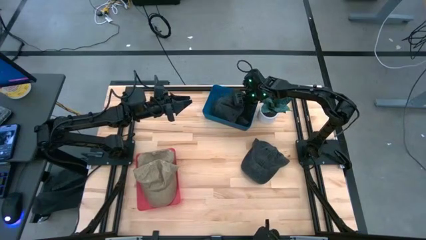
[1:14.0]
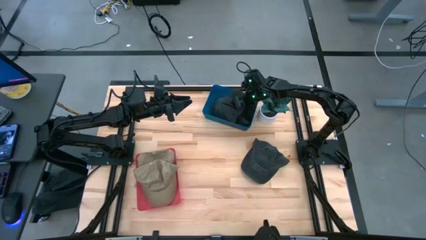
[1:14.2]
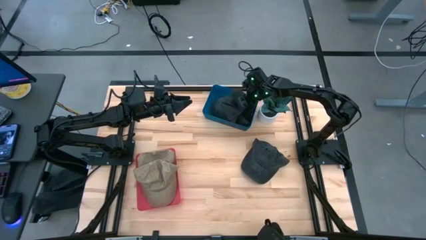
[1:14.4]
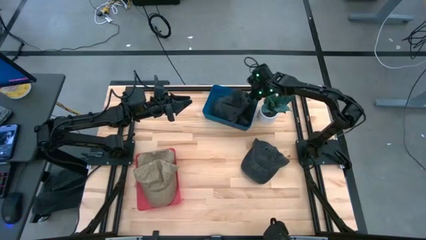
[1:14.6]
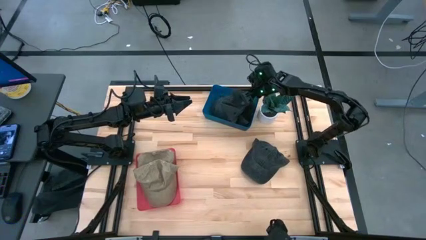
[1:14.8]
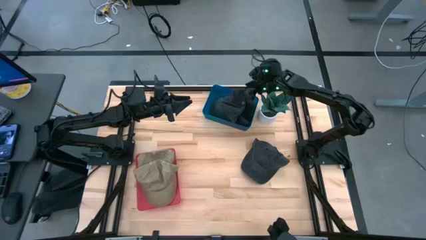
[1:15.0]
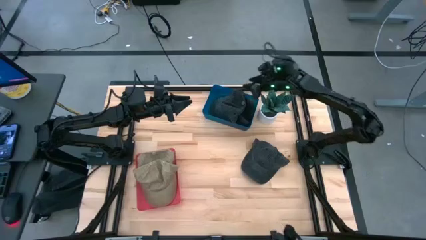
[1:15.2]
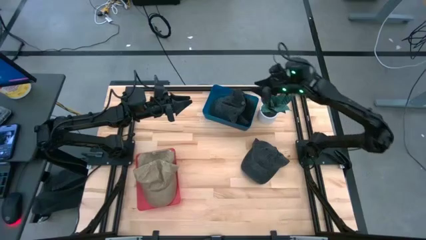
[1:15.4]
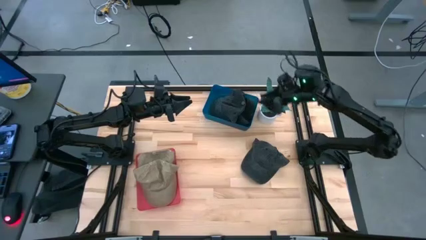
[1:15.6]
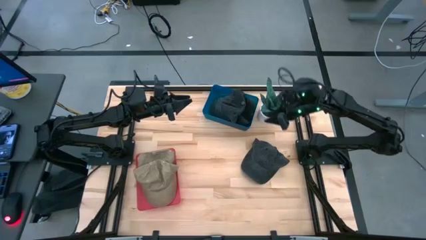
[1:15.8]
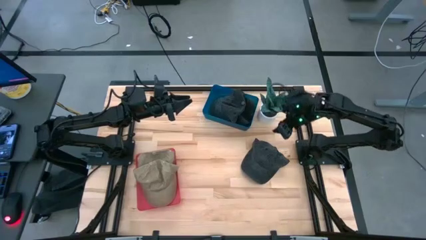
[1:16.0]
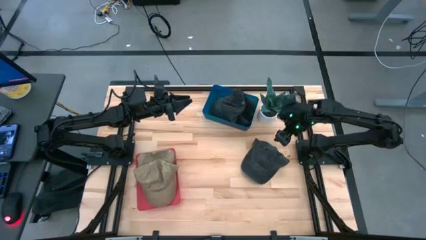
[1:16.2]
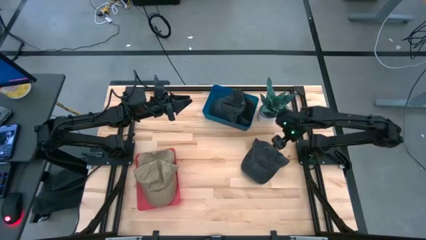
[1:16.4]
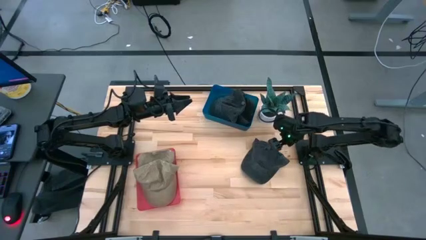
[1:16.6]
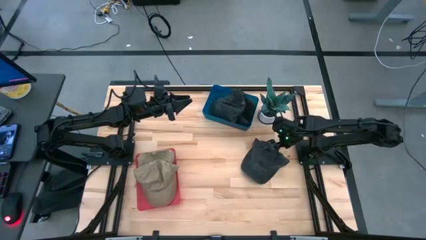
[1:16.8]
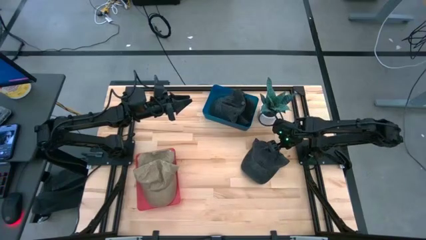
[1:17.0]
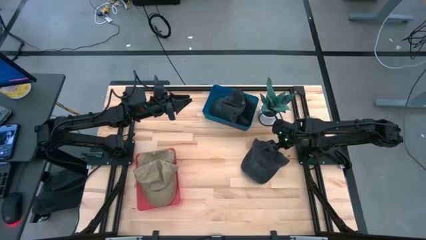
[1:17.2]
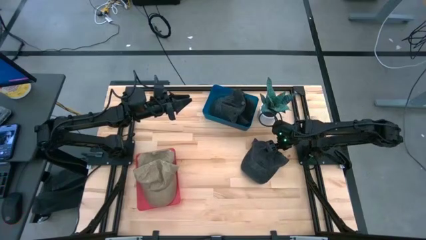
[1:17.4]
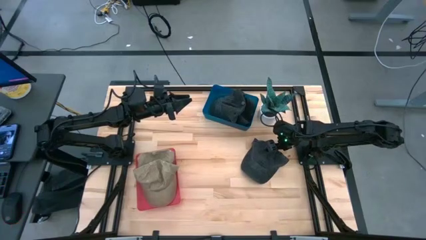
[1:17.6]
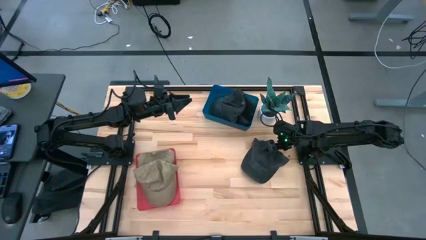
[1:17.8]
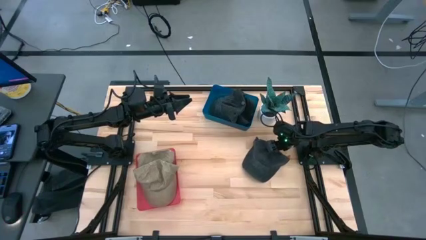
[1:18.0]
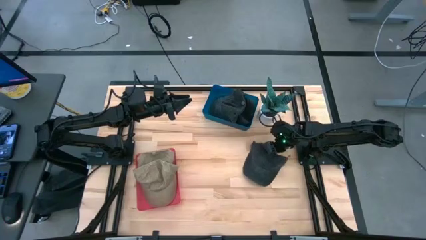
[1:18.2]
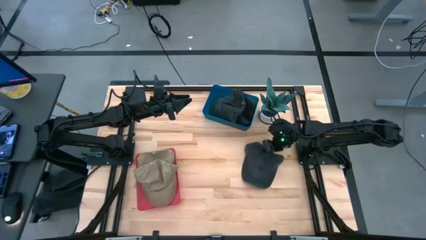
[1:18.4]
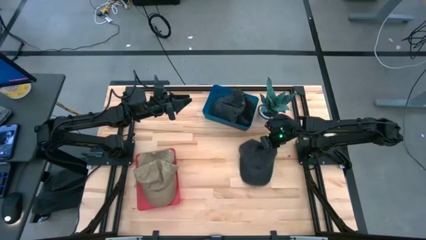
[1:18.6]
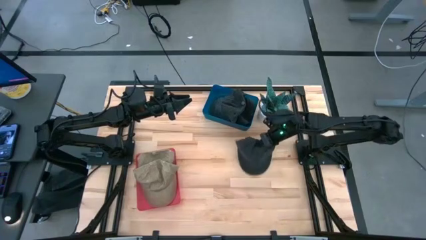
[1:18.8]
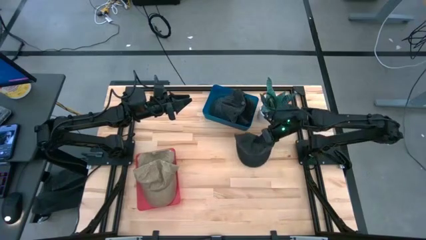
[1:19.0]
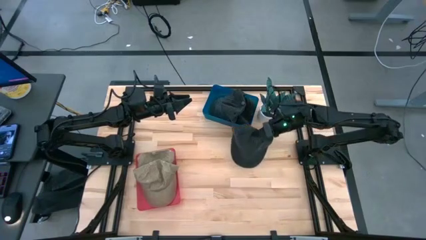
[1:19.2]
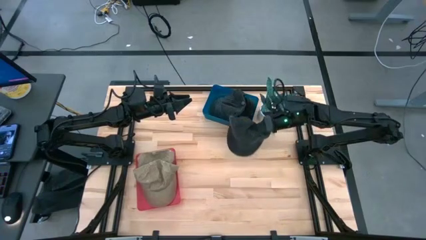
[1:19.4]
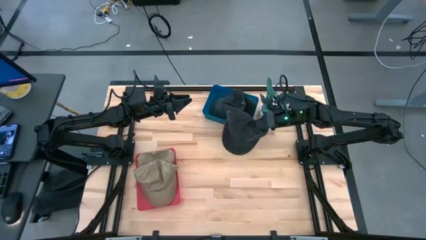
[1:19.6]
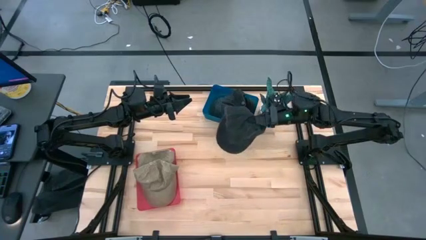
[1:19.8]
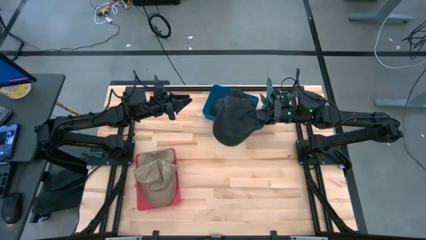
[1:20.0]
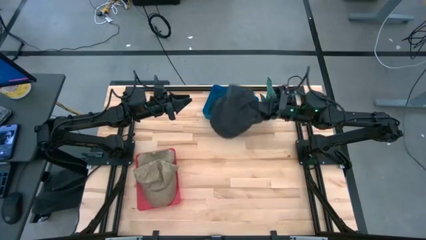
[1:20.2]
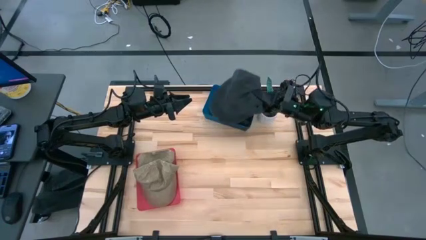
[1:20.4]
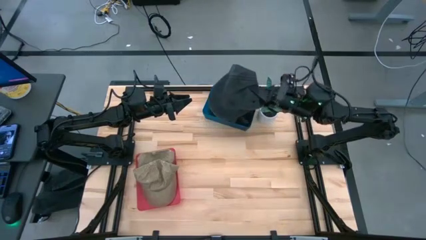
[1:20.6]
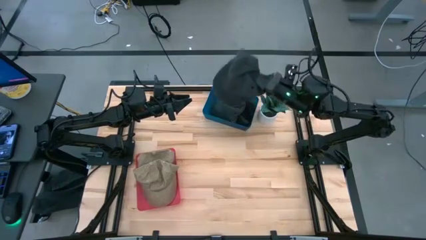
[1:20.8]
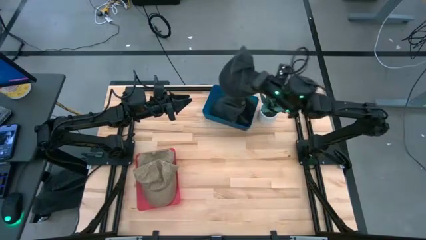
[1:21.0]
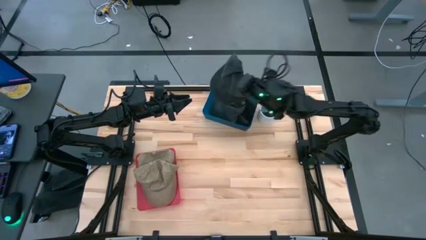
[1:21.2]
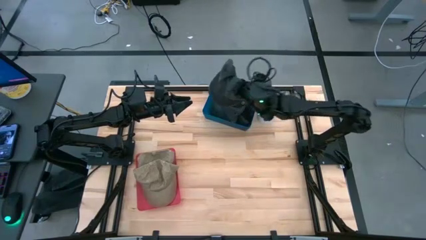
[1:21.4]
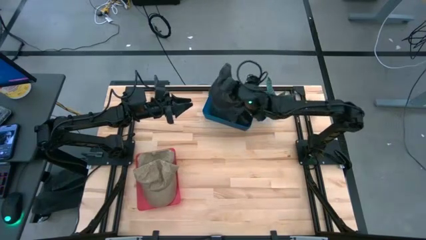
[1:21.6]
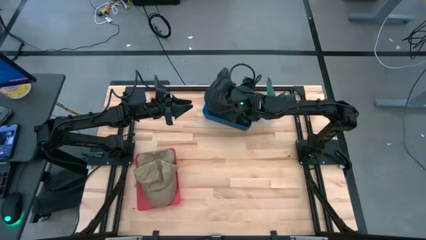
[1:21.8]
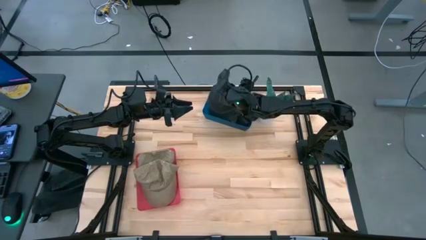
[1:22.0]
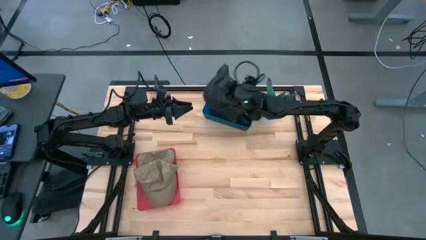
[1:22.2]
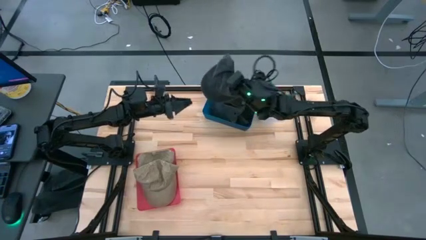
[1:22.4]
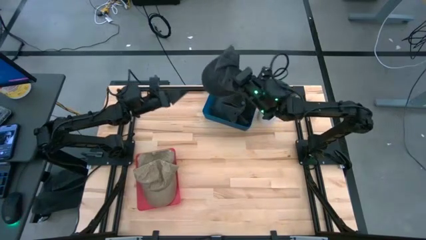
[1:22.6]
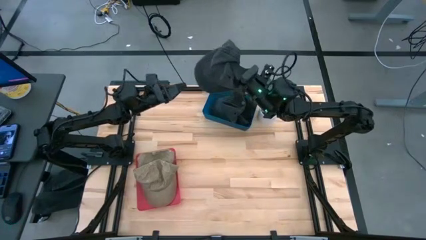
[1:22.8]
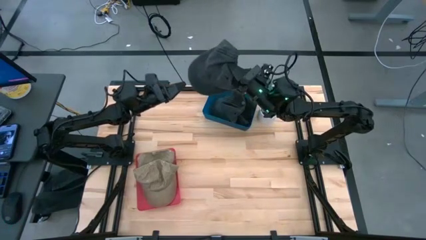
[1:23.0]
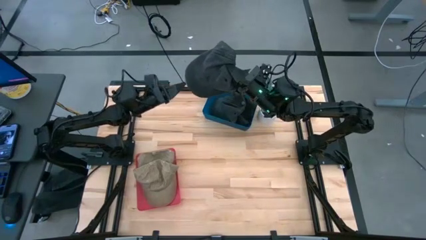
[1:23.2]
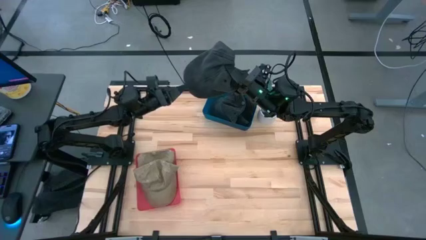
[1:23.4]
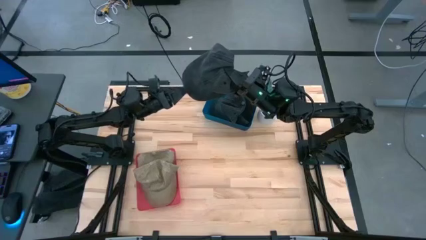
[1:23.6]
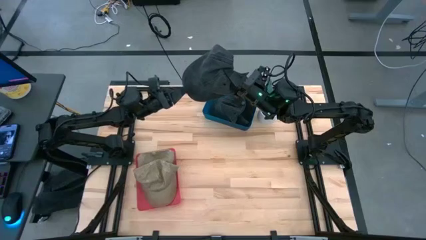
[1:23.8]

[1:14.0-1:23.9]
Task: Pick & Place hat
Put the black cap into the blue bin

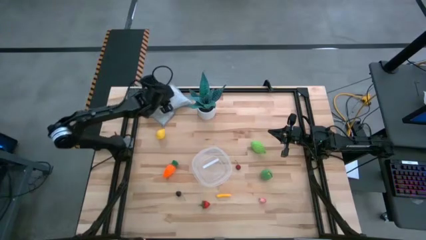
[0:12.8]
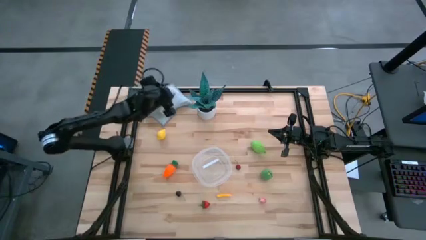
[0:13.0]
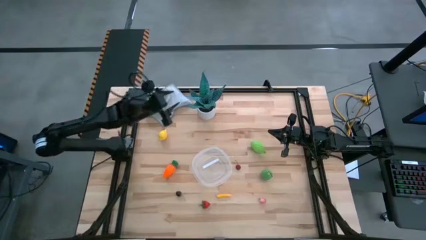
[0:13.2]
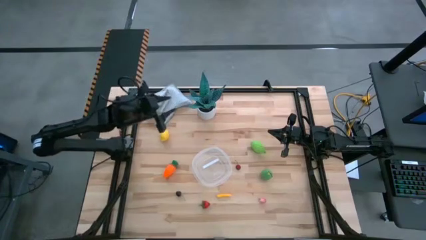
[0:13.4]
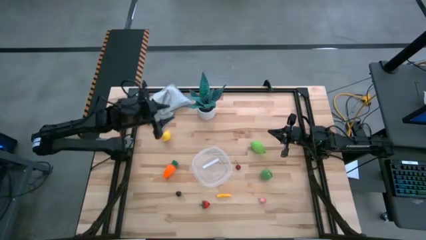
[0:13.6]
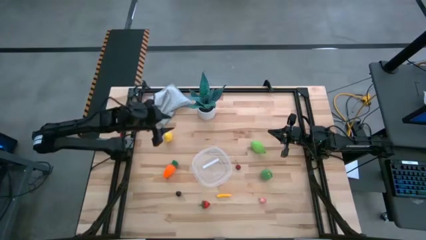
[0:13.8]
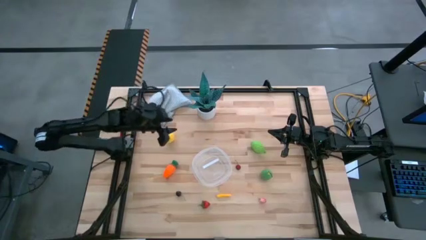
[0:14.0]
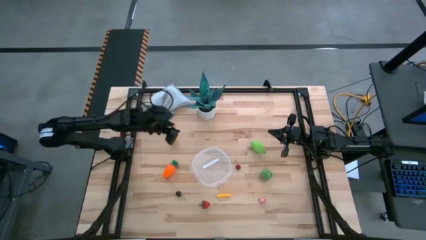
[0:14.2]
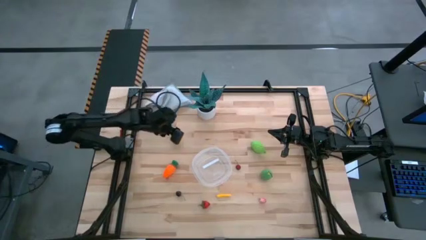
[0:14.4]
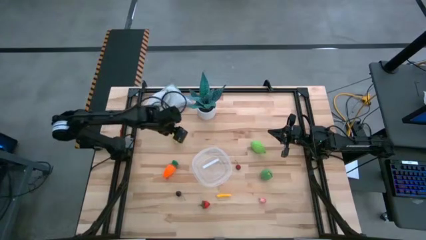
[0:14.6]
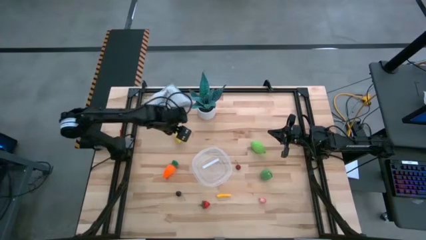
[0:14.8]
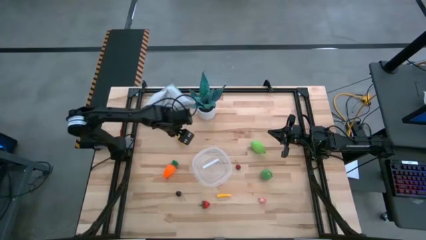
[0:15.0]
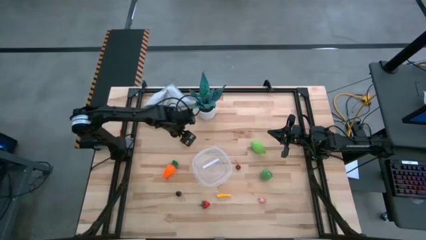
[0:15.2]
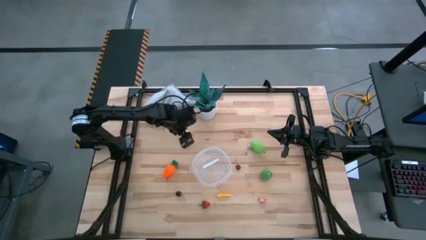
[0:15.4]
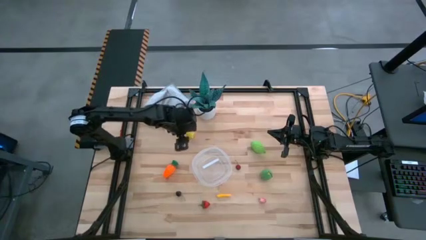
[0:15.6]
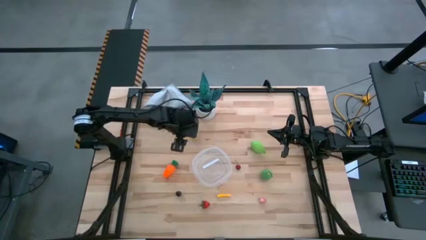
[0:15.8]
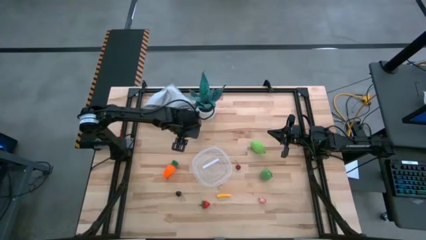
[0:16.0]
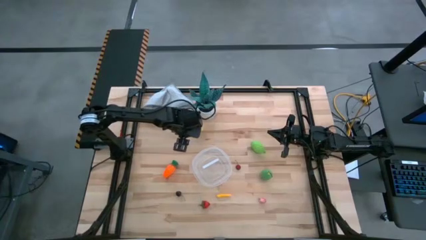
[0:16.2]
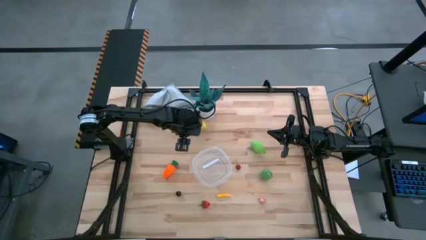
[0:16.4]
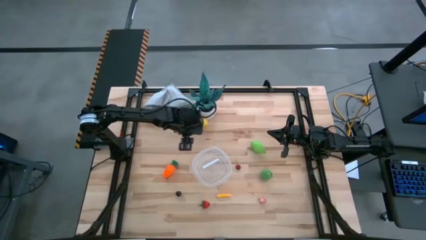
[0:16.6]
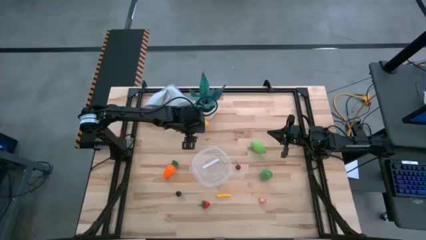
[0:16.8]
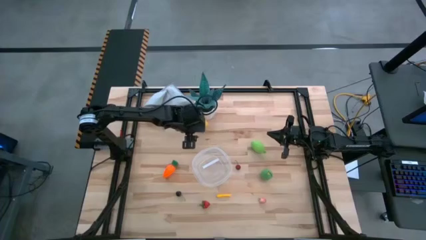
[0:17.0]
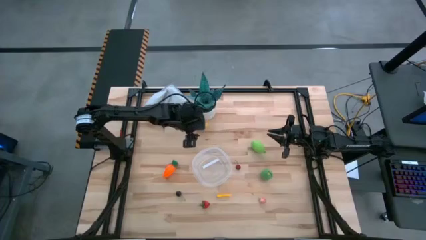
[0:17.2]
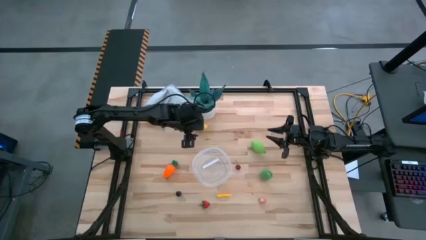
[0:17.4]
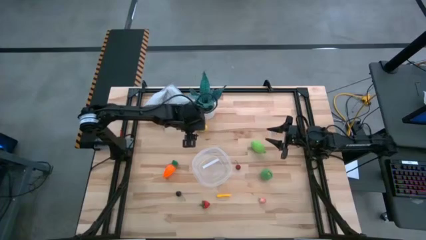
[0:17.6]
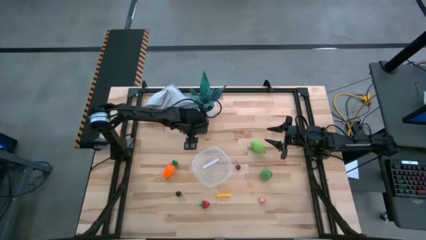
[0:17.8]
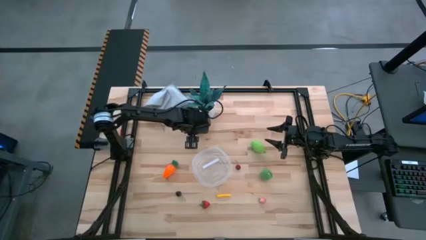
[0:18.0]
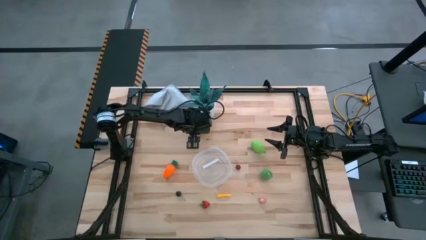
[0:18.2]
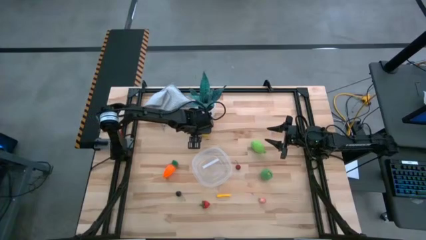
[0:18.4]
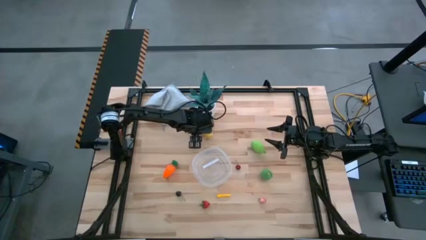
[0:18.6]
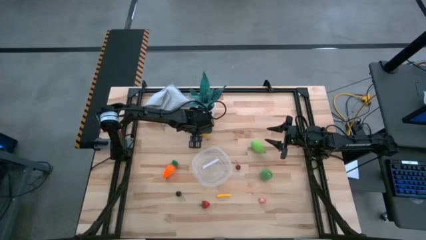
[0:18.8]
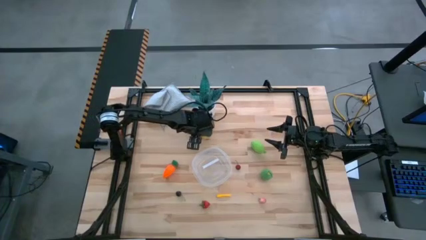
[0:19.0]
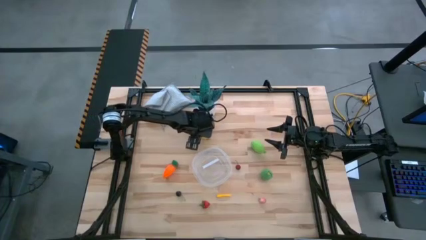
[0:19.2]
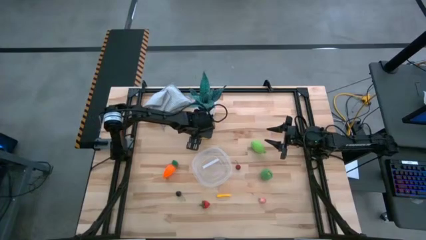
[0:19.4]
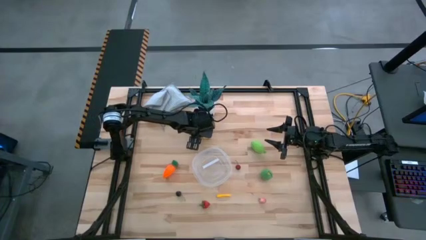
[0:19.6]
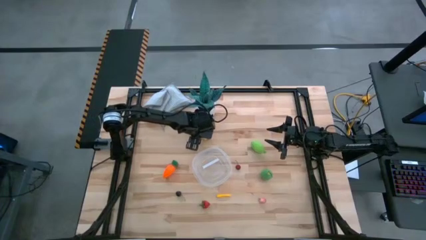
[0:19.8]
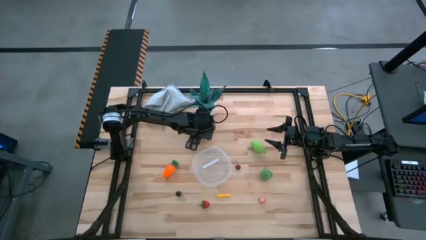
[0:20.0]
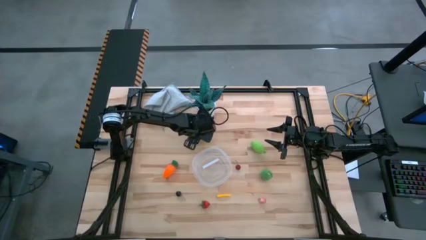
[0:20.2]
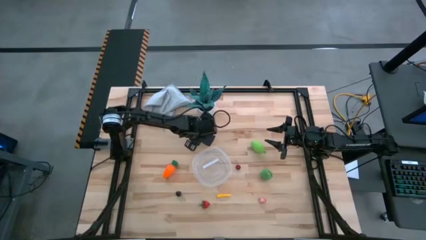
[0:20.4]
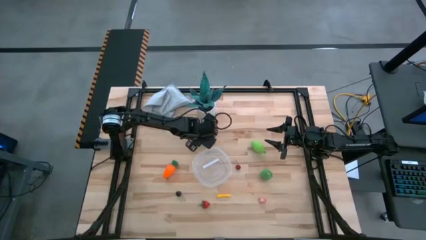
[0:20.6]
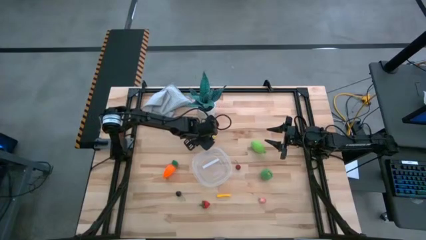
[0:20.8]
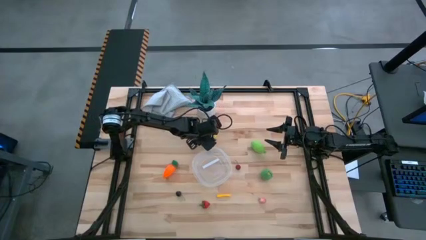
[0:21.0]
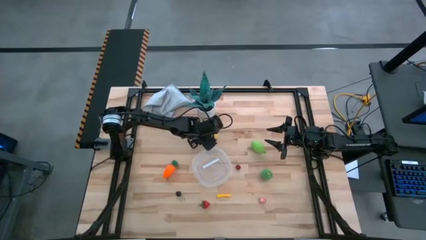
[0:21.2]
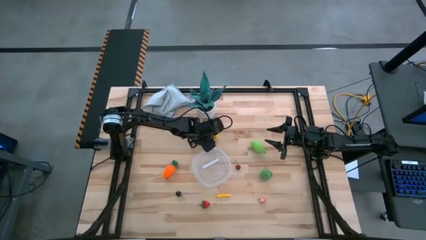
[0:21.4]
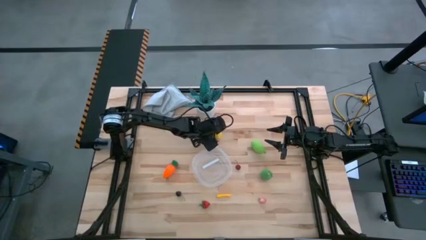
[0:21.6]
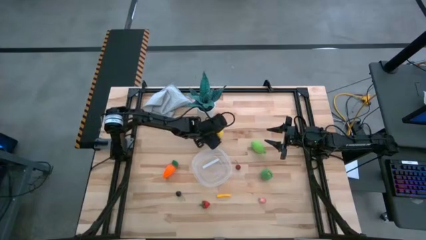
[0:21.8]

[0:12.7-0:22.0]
Task: Pick and placing Produce into tupperware
Put the lemon into the bin
